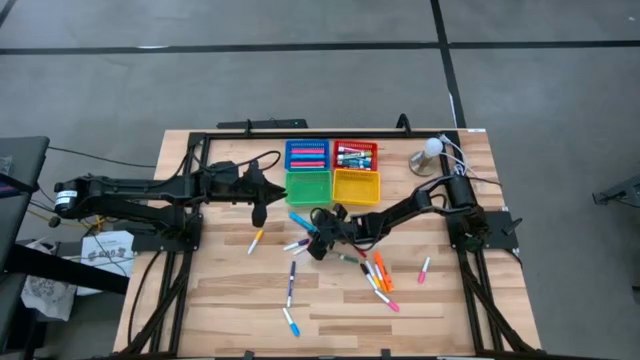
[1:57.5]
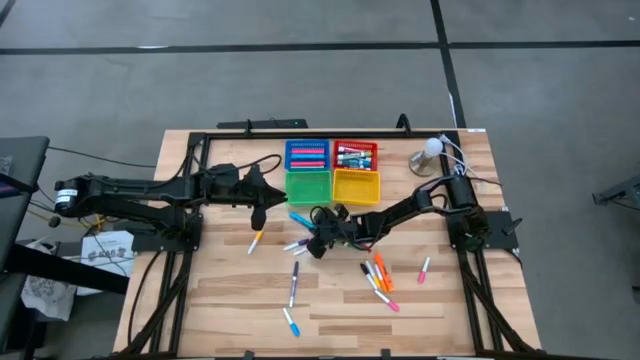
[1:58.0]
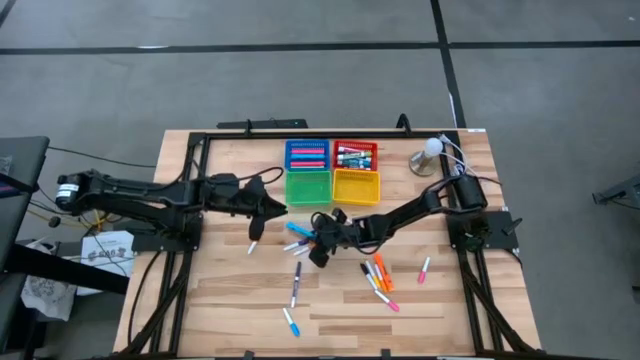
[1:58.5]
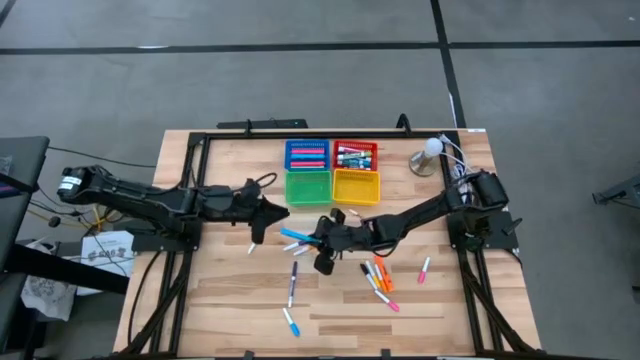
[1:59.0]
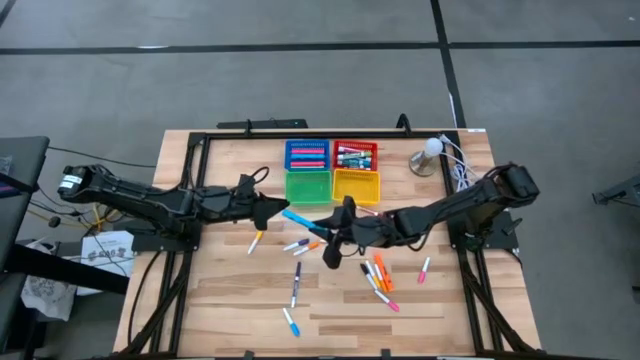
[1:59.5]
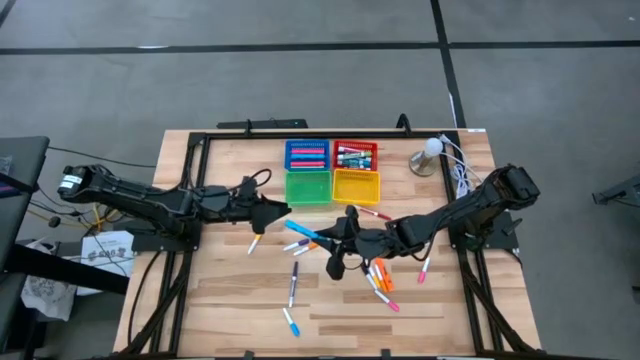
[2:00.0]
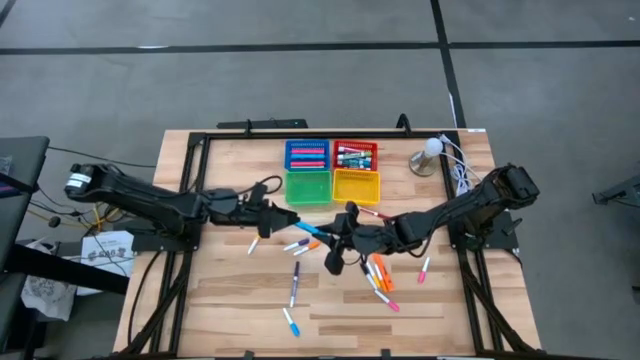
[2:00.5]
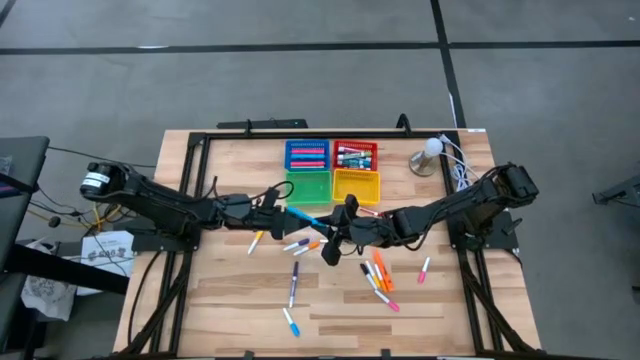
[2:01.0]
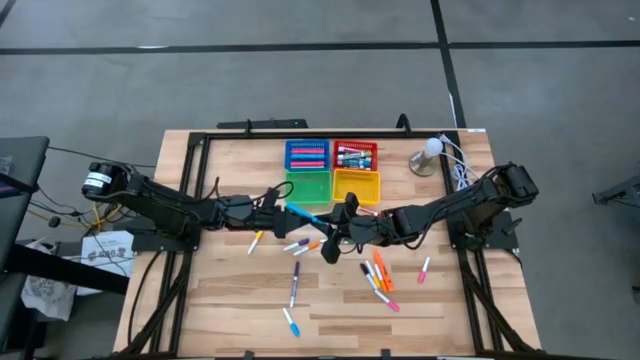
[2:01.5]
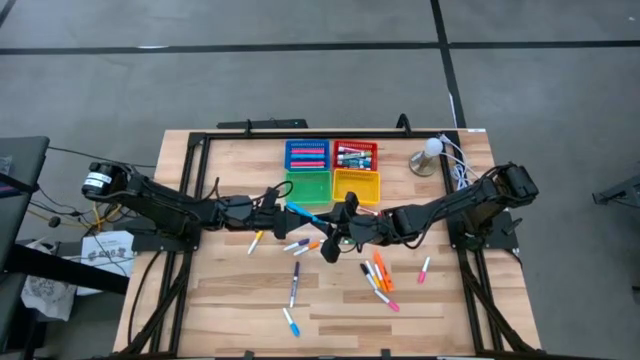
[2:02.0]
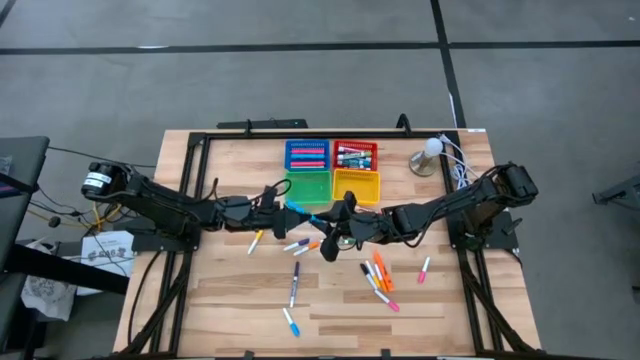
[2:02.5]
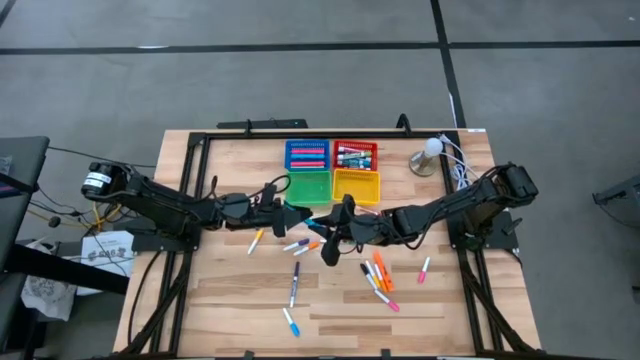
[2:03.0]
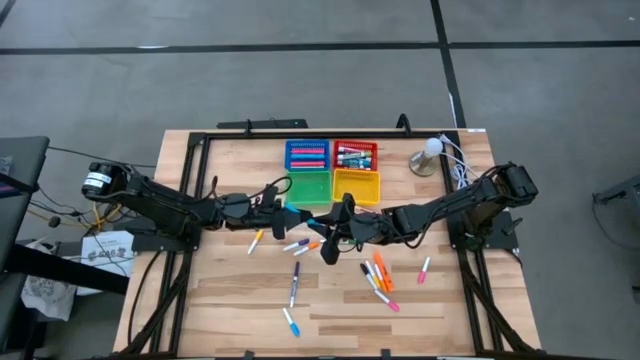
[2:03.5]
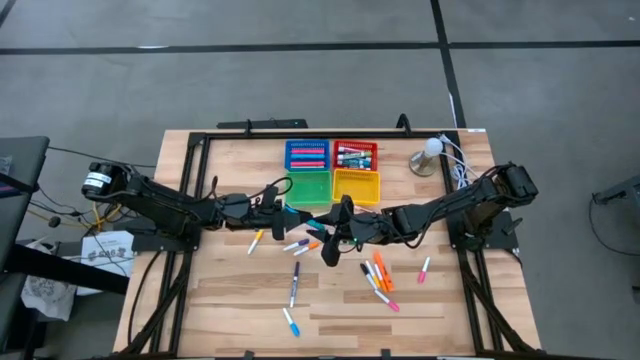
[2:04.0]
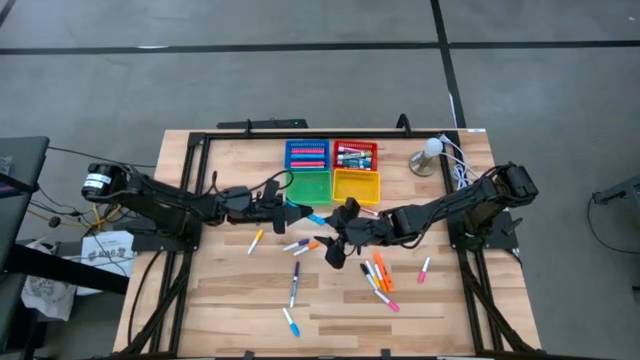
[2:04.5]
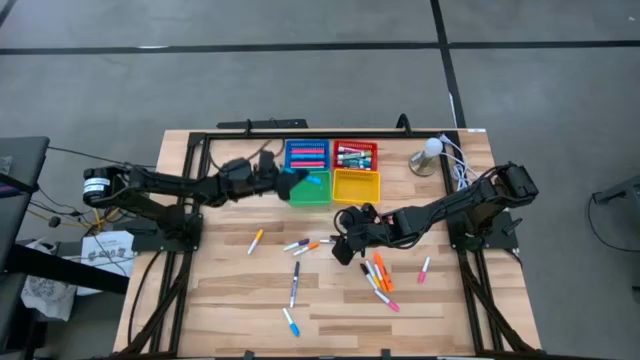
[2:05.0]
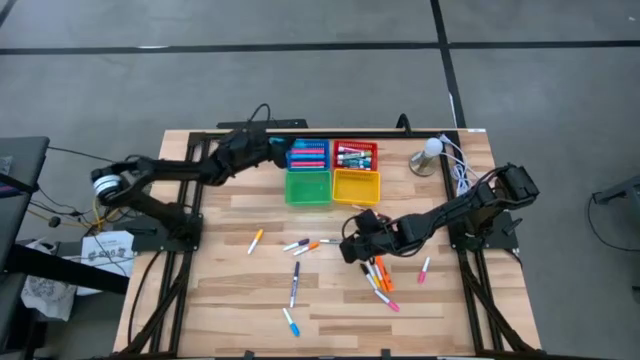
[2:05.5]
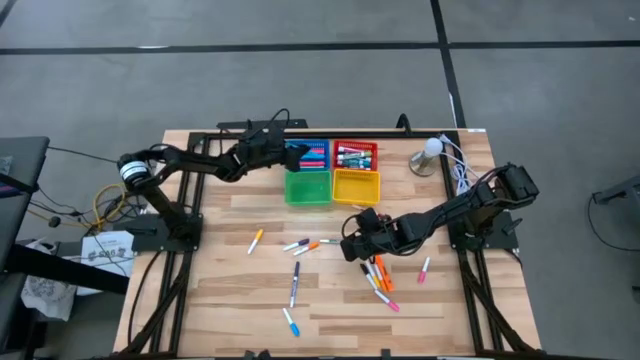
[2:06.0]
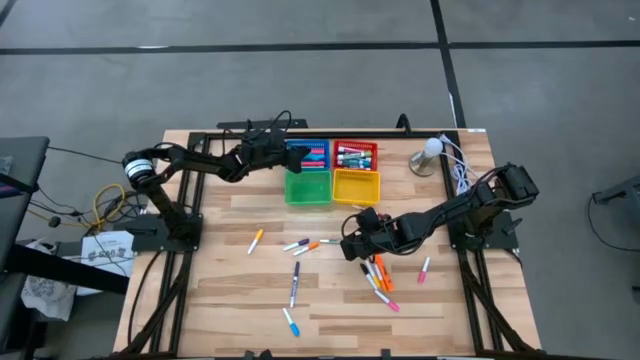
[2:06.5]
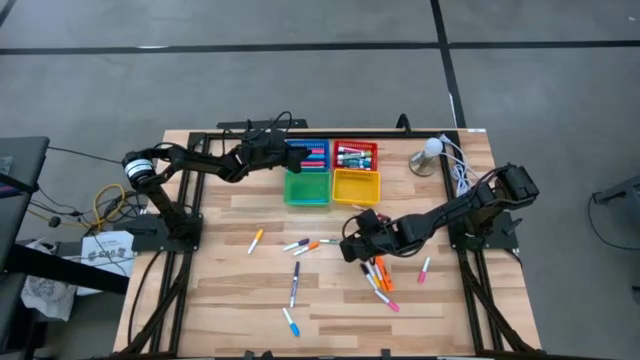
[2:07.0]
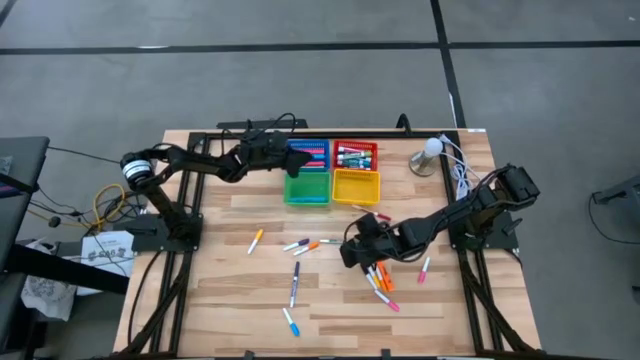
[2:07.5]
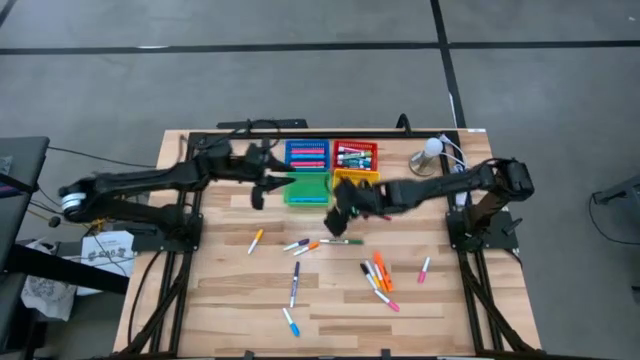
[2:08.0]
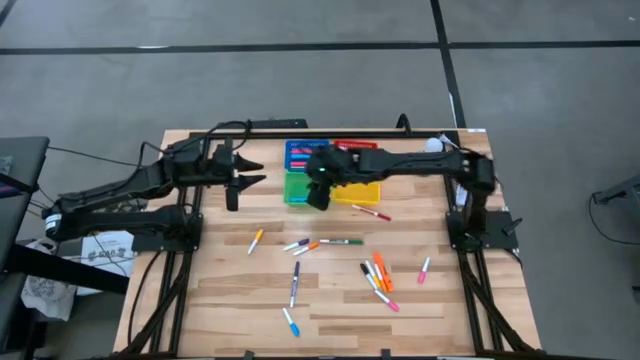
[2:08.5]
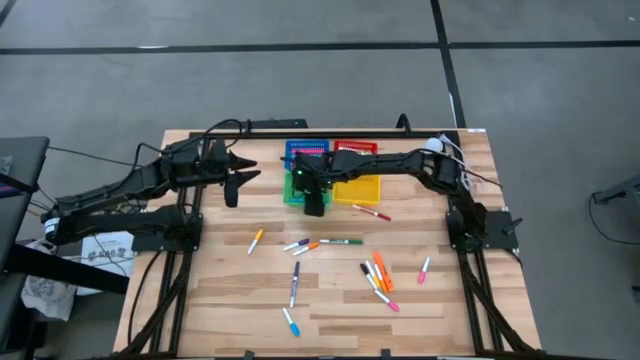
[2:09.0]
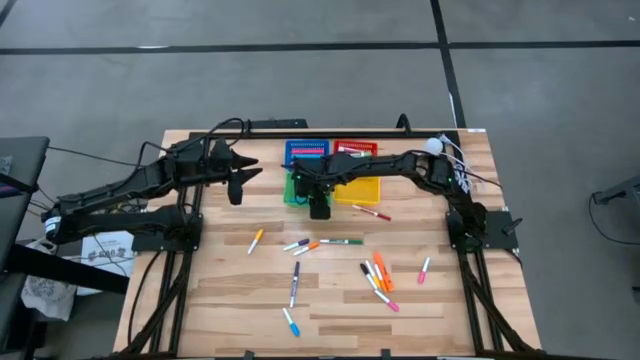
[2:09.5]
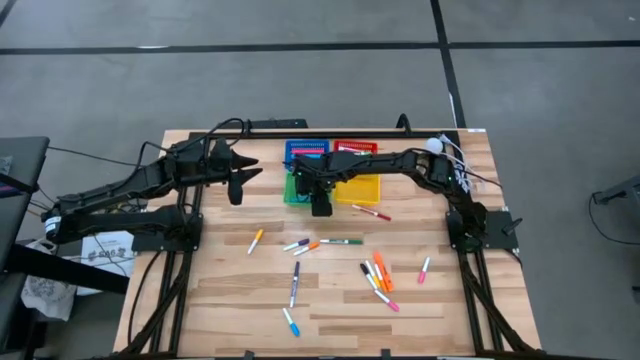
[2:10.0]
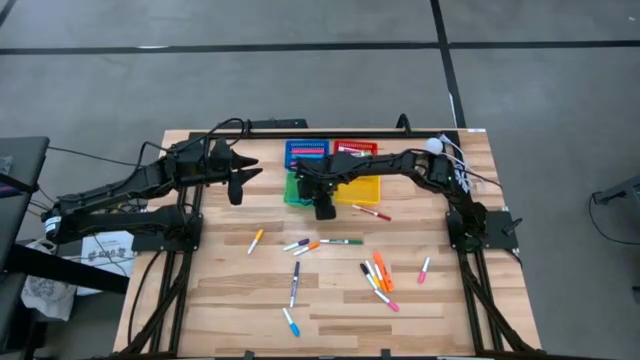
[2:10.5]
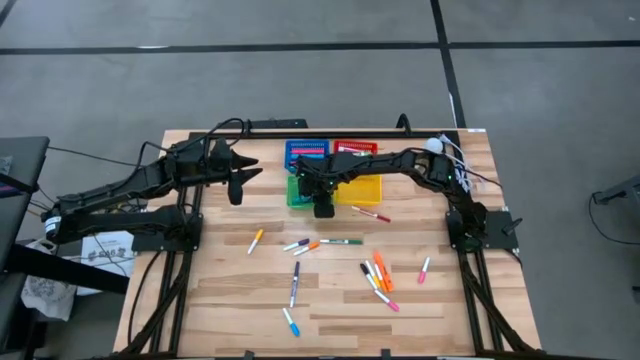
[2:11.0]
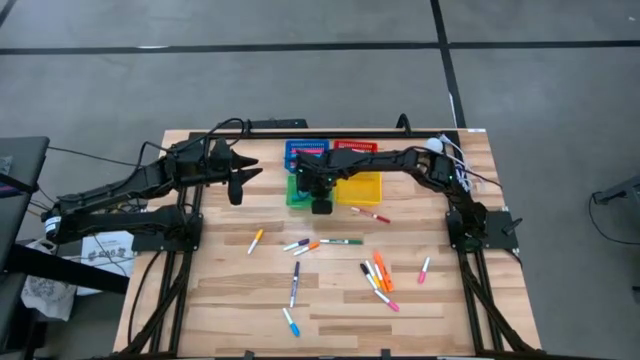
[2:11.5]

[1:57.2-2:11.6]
Task: Pick & Place Markers
Put the blue highlighter into the blue bin

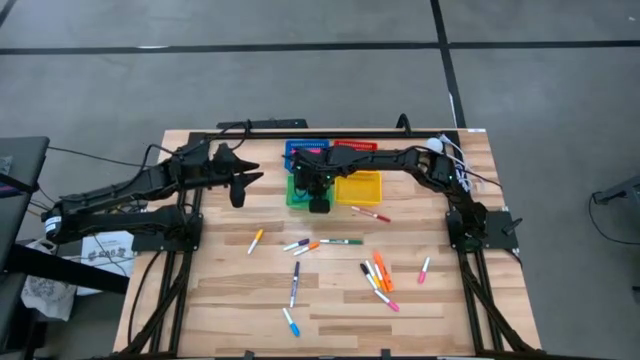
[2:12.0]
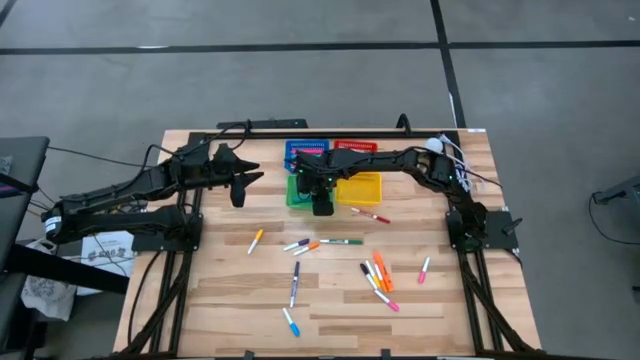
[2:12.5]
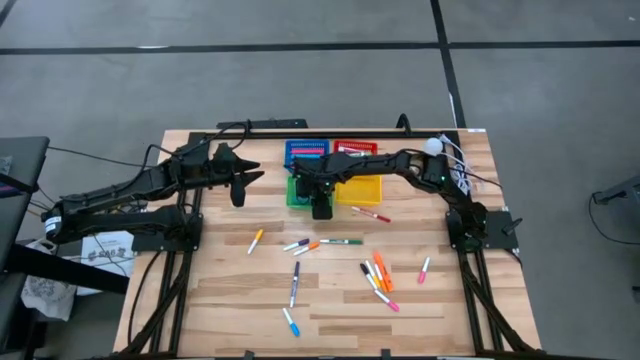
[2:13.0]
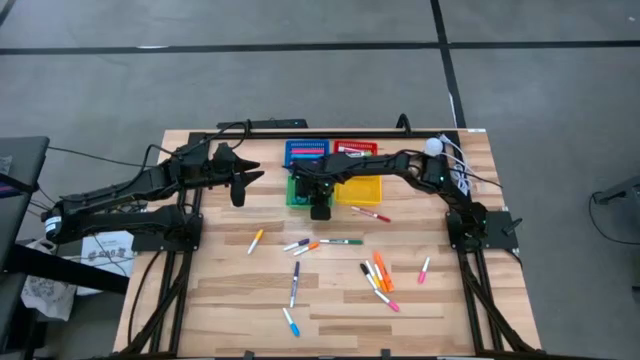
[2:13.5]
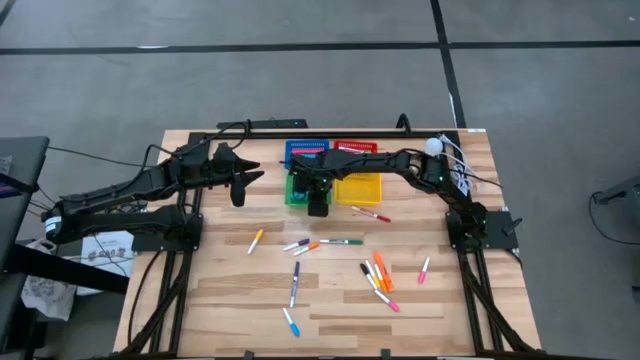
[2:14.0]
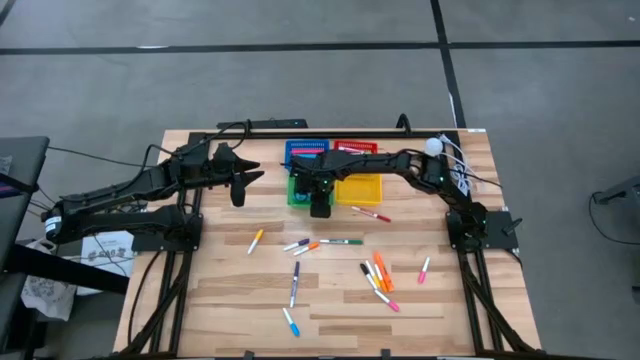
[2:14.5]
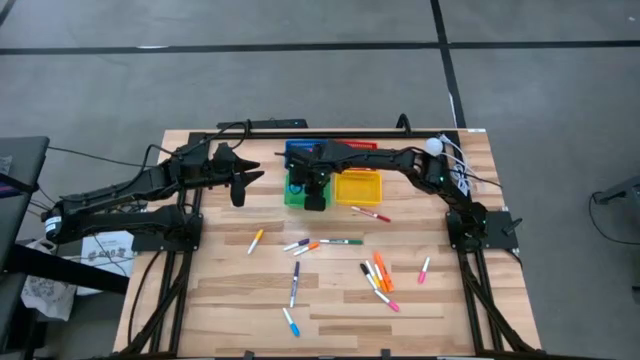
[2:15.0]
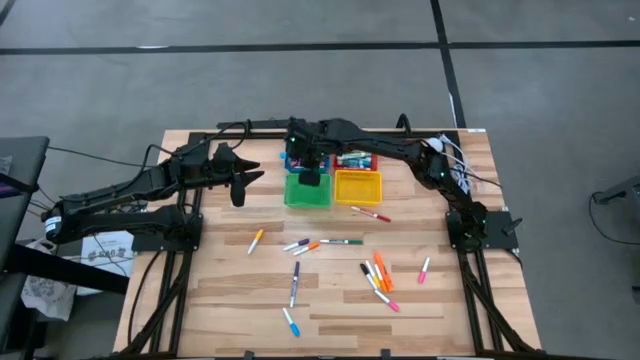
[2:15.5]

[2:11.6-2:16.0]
Put the blue highlighter into the blue bin

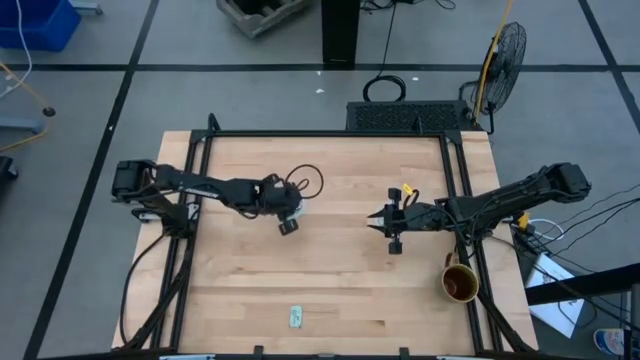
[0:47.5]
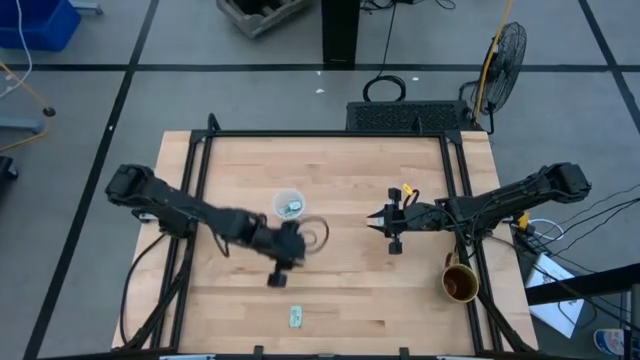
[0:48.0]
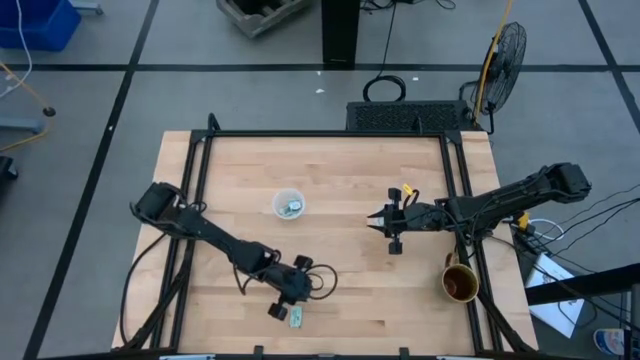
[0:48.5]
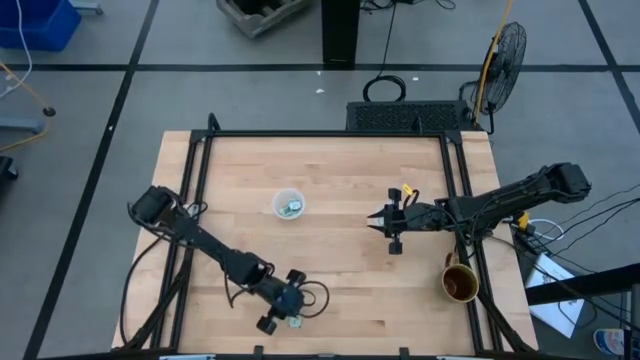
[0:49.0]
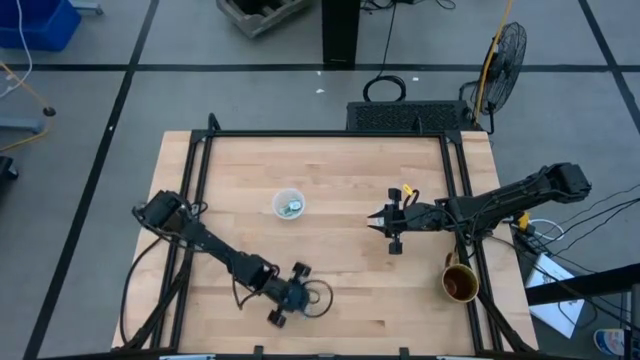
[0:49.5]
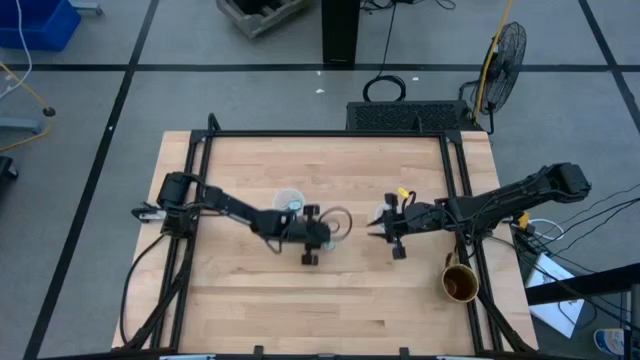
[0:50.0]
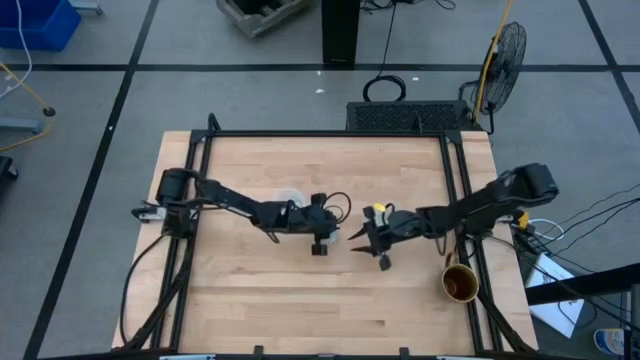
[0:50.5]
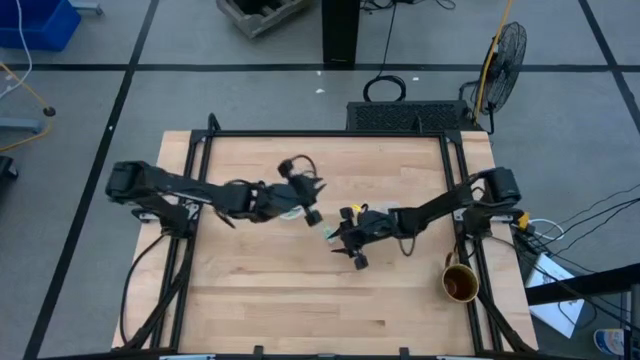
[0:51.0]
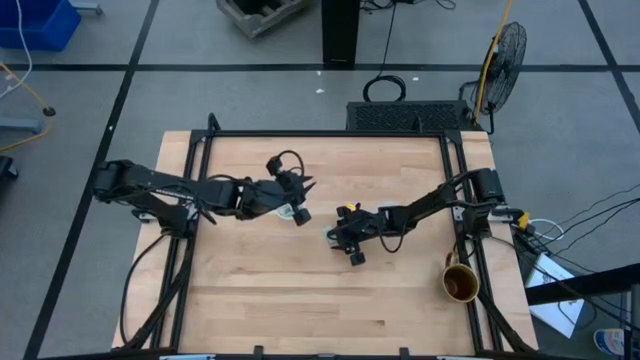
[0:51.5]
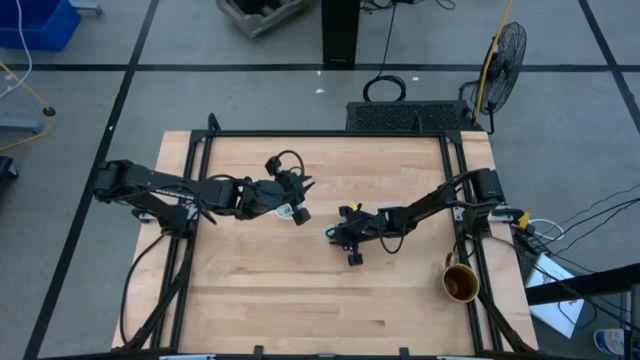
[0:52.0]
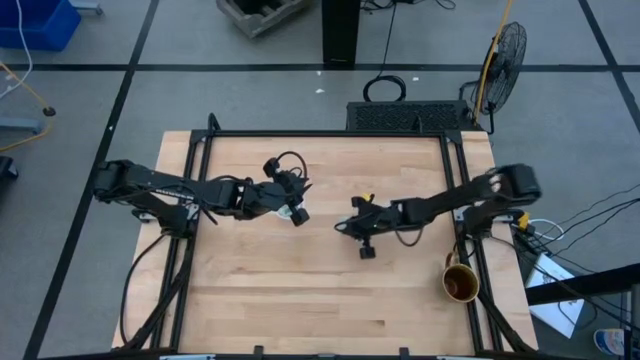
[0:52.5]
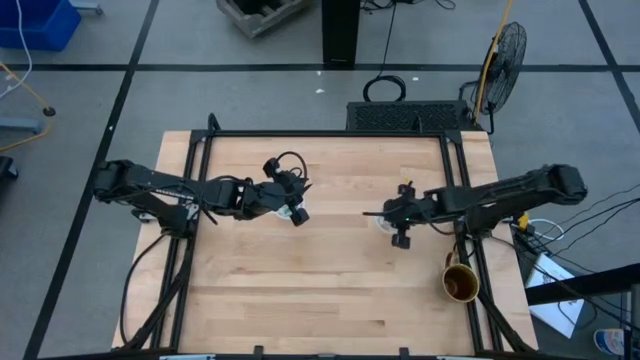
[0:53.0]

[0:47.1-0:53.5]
Task: Pick and place Stevia / Truvia into bins
Put the stevia packet into the right container
